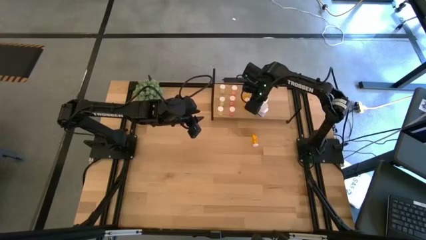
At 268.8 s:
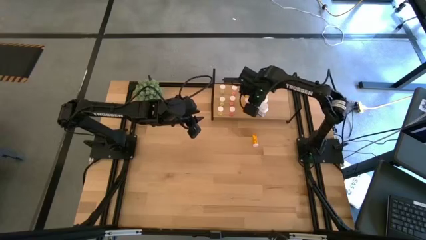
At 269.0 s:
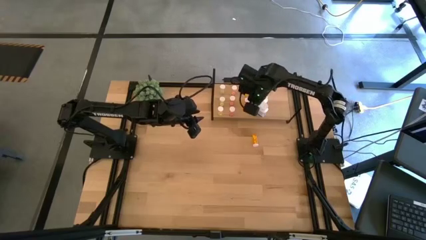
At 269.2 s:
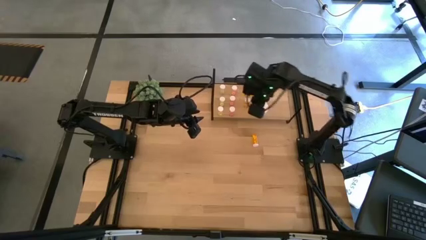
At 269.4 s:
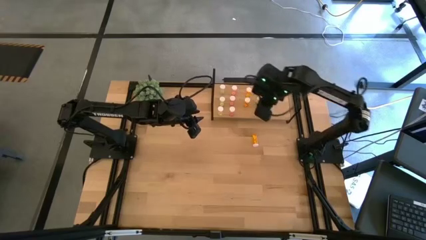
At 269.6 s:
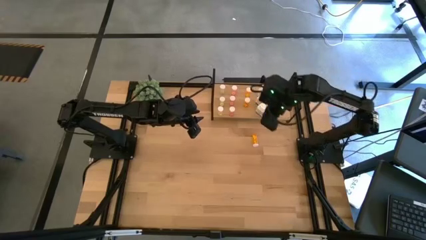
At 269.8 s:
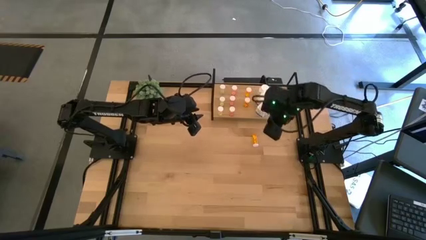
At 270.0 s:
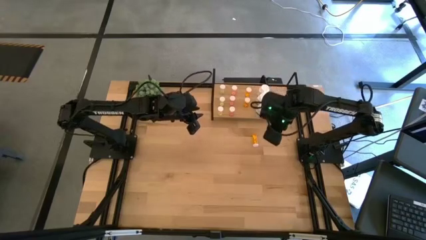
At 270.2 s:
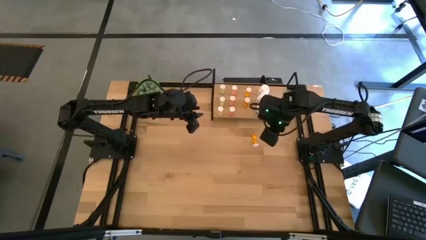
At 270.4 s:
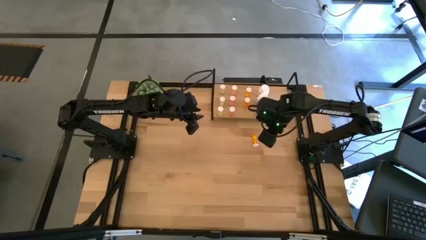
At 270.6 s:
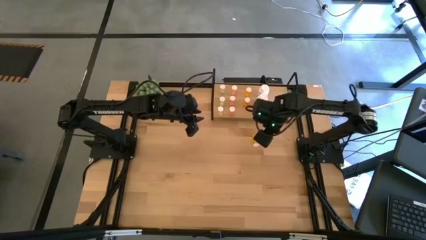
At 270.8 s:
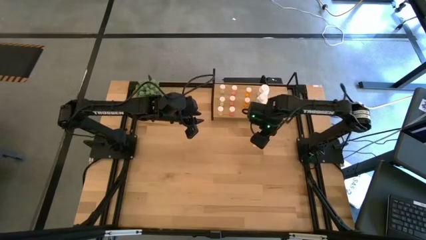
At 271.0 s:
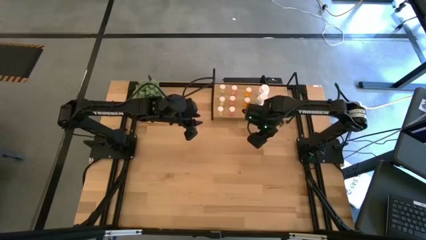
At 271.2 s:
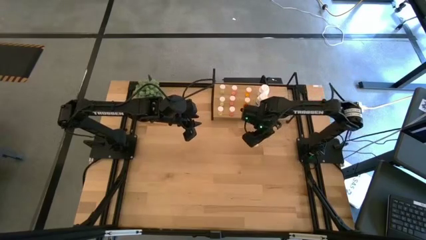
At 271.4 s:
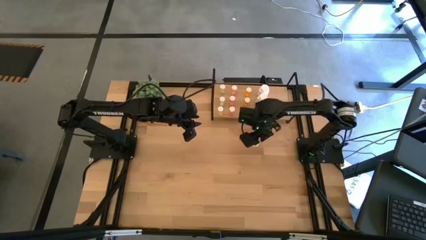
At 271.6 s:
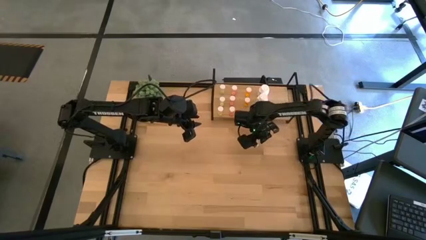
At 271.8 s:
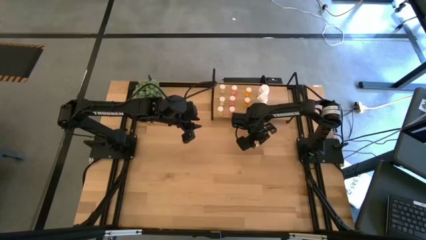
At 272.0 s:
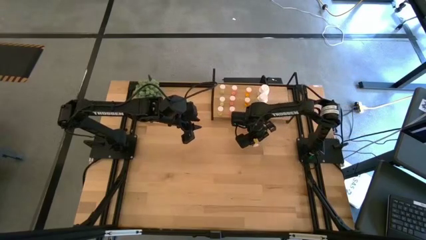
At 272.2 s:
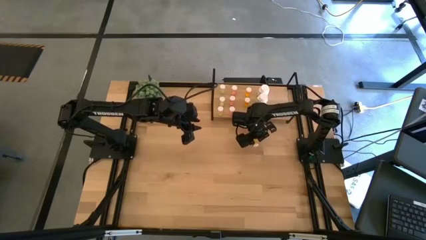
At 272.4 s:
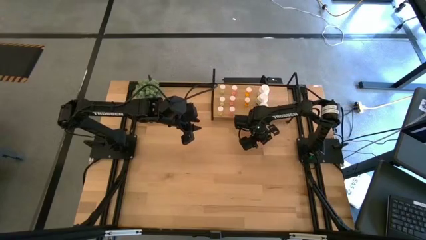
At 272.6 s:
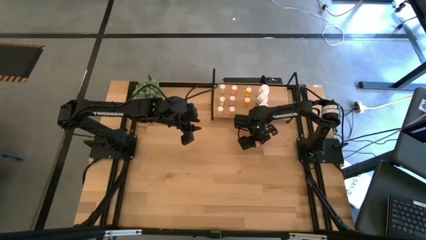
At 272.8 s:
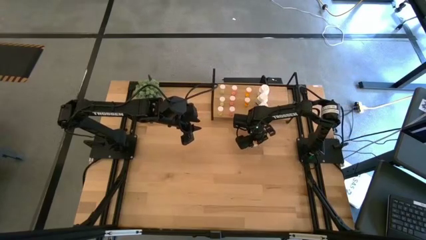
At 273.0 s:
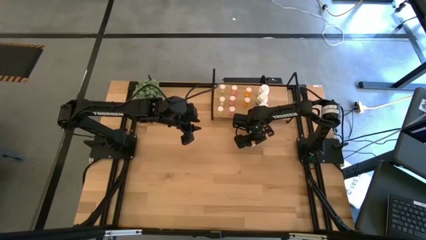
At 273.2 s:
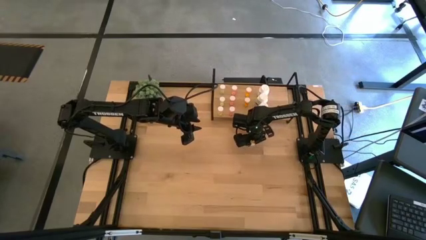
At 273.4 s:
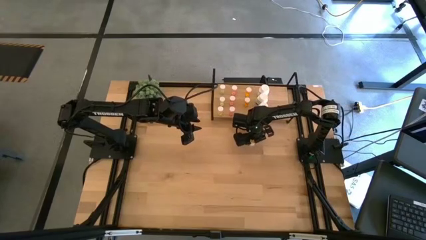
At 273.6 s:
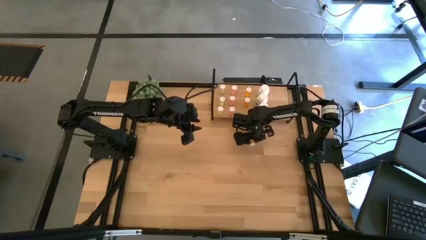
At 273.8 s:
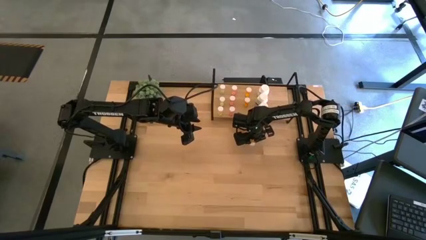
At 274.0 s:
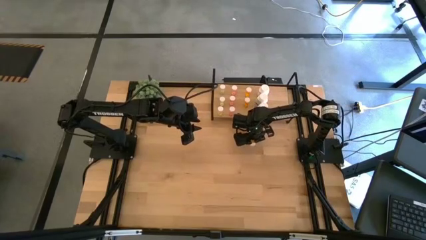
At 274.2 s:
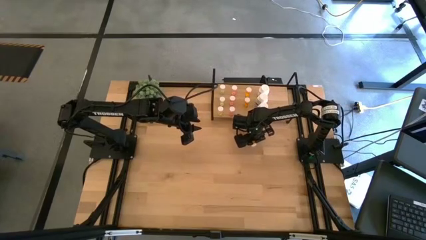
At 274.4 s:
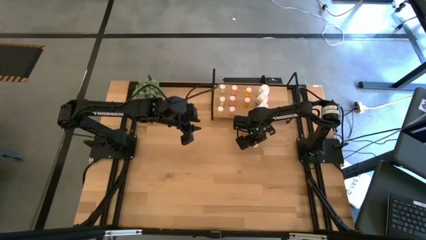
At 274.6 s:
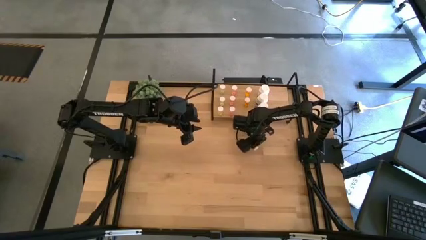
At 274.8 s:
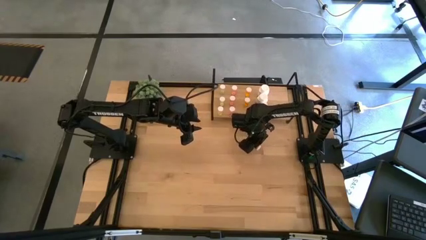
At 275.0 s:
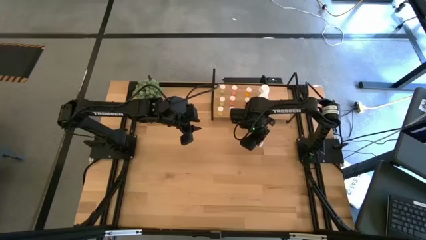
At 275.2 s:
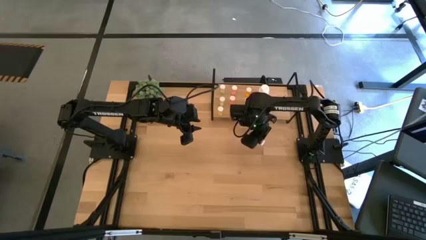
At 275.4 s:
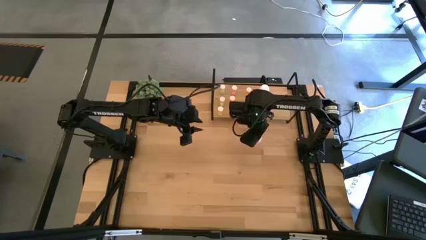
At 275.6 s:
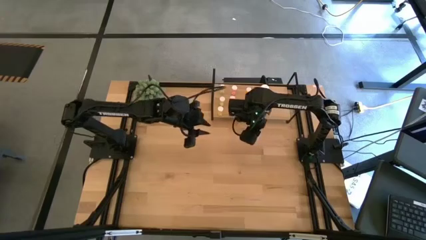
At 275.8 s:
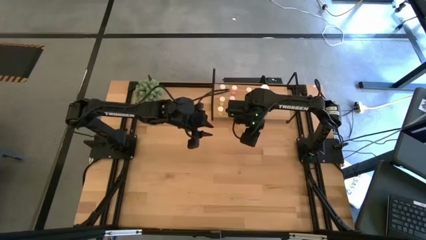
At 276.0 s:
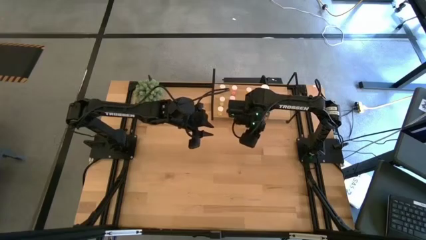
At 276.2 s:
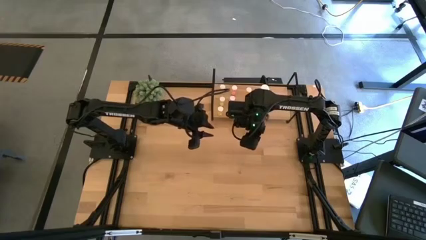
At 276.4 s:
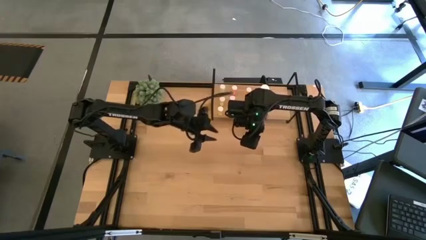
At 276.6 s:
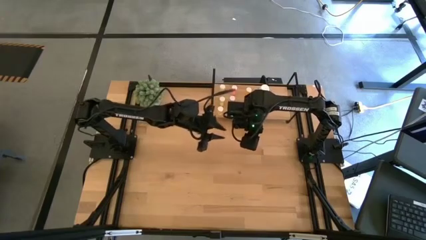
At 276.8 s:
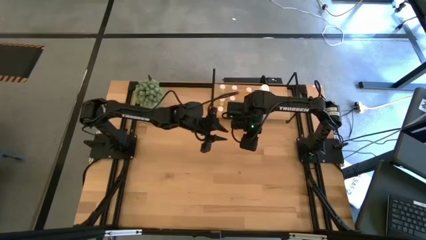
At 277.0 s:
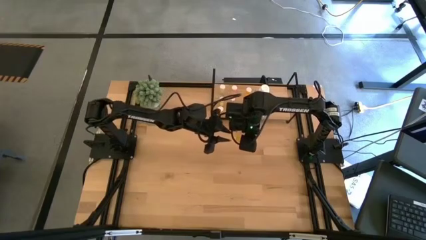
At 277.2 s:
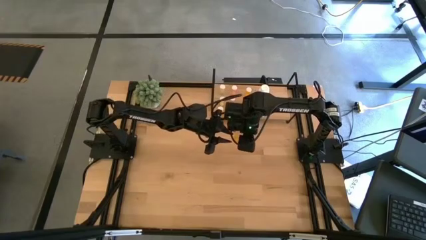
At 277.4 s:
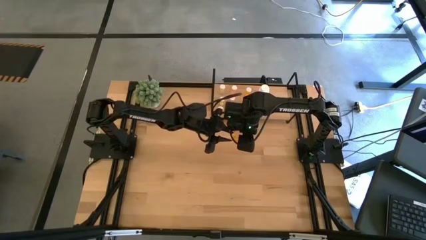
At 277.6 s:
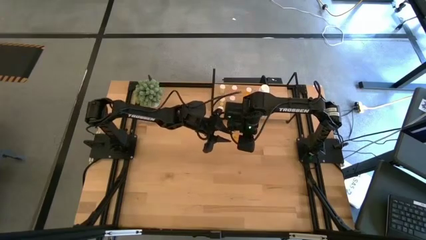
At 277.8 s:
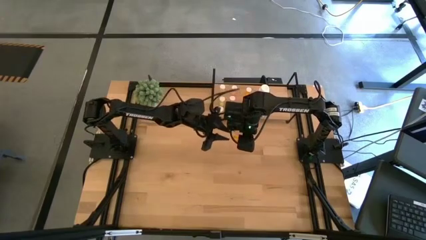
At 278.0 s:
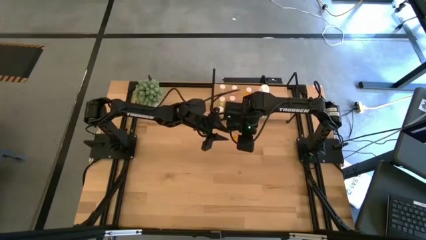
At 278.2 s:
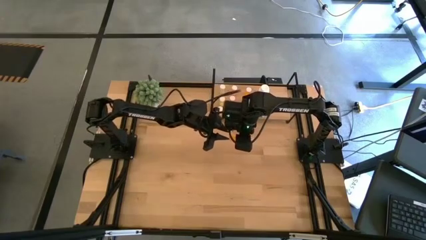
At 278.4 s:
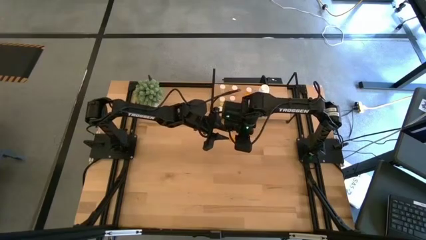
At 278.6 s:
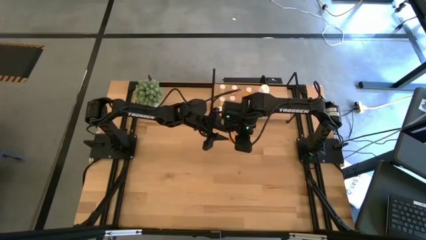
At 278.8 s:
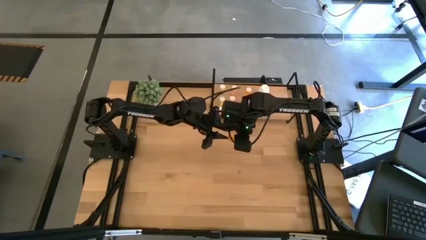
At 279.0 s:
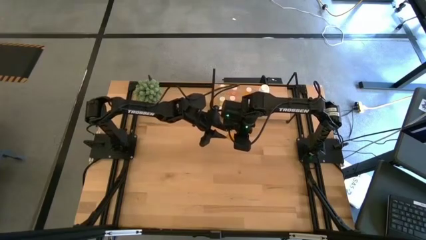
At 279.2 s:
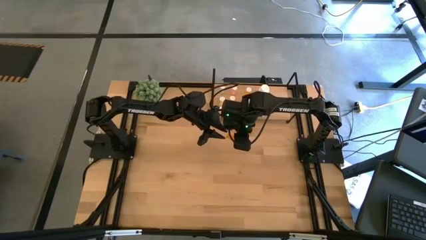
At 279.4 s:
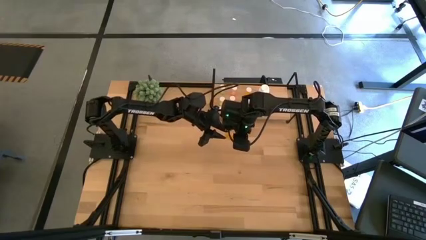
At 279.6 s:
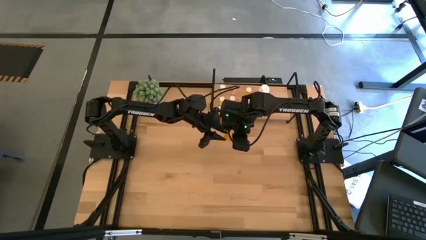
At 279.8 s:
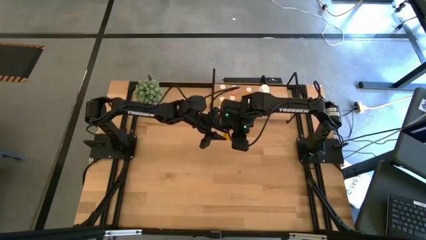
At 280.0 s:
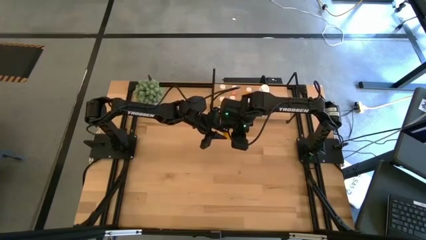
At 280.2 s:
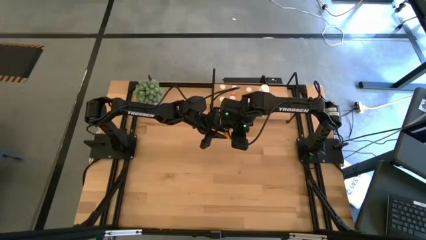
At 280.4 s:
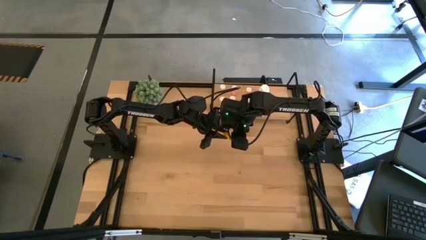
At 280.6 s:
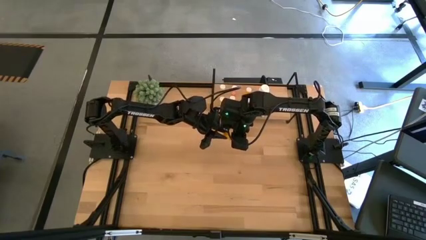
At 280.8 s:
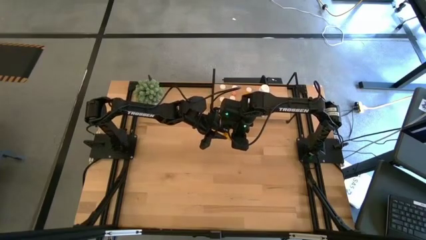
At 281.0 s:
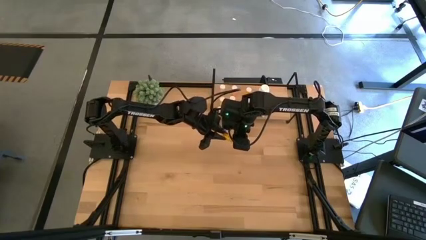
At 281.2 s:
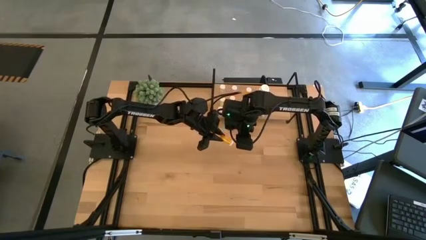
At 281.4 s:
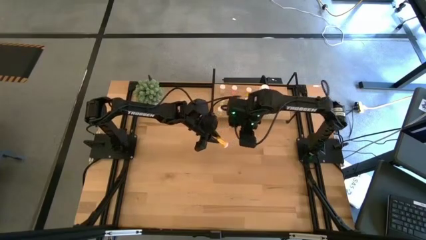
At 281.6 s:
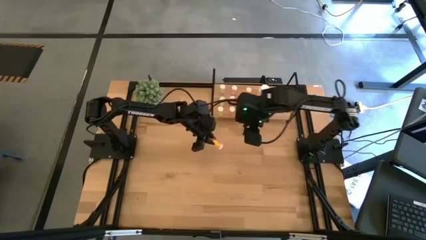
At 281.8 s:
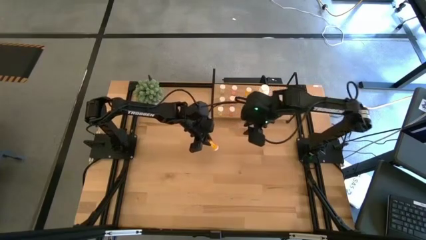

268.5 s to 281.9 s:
Task: Pick and place medicine bottles onto shelf by color
Put the orange pill bottle on the shelf aligned with the other orange pill bottles

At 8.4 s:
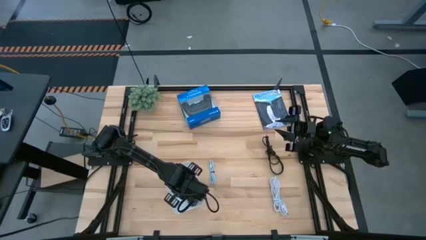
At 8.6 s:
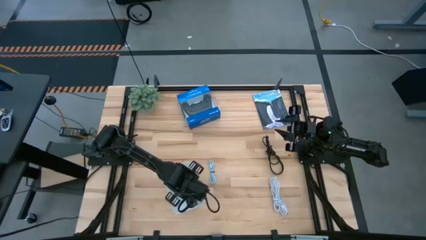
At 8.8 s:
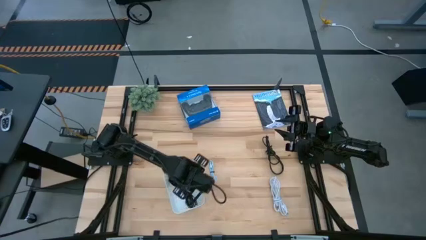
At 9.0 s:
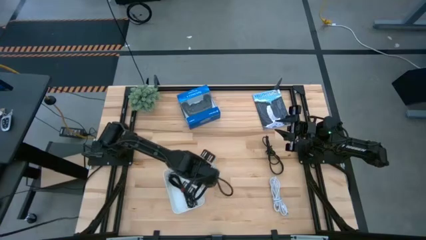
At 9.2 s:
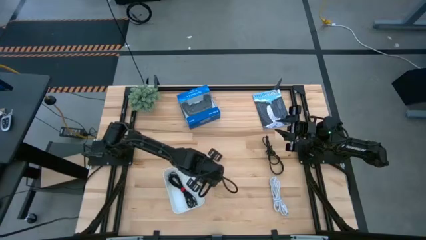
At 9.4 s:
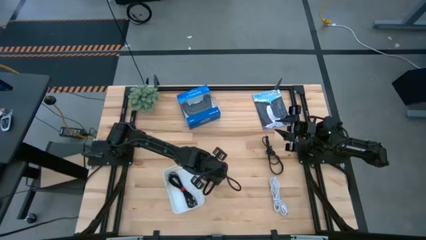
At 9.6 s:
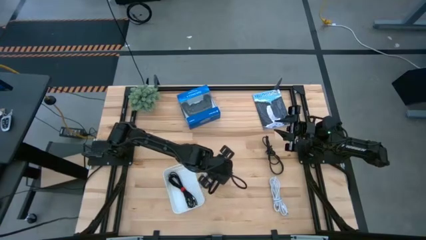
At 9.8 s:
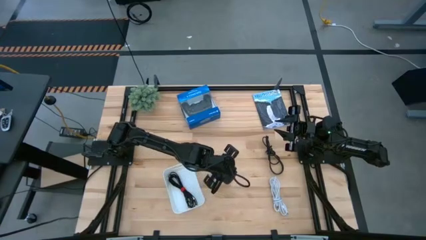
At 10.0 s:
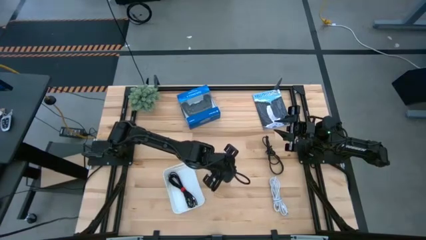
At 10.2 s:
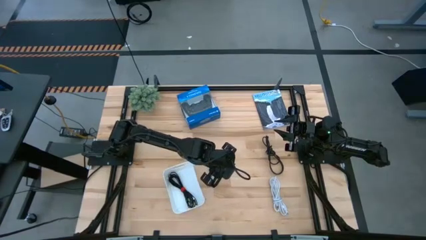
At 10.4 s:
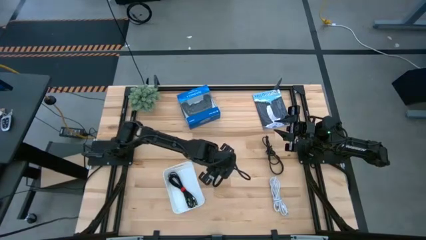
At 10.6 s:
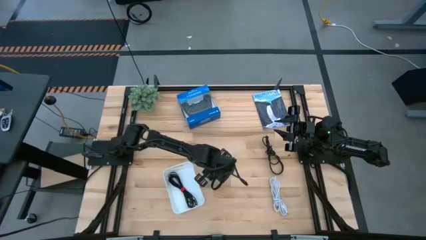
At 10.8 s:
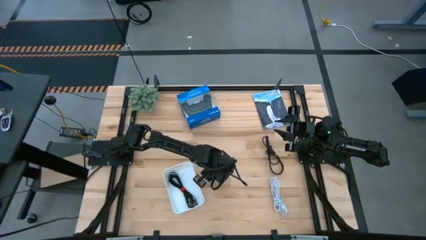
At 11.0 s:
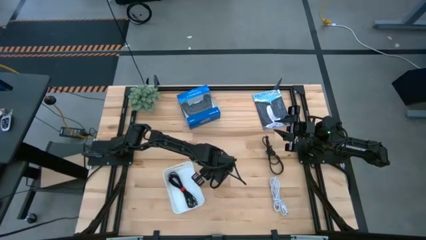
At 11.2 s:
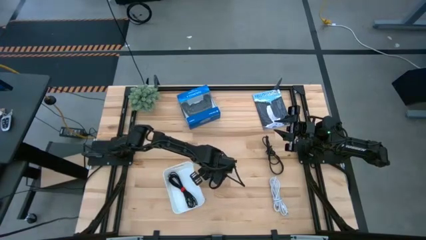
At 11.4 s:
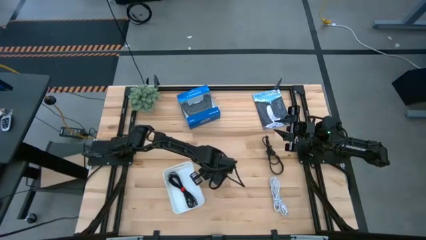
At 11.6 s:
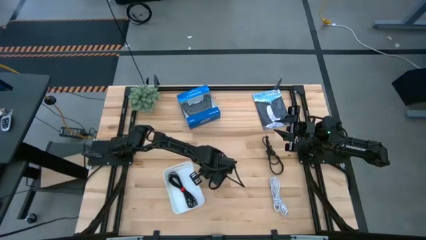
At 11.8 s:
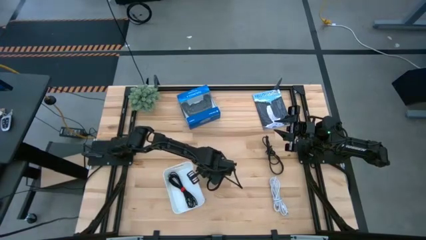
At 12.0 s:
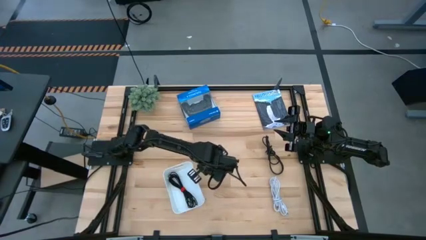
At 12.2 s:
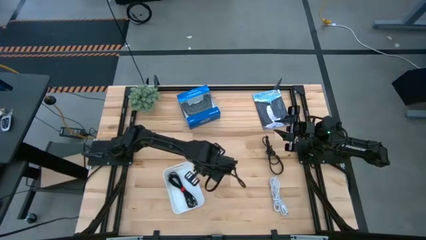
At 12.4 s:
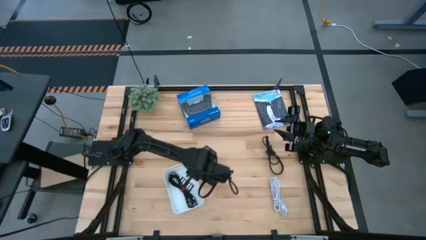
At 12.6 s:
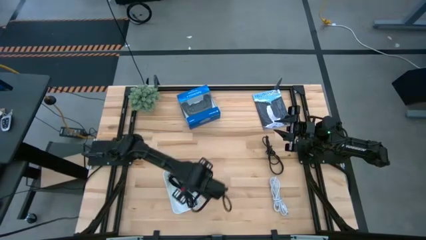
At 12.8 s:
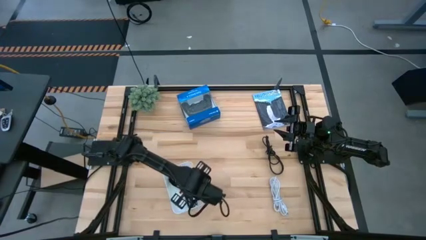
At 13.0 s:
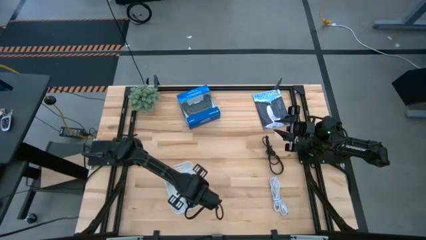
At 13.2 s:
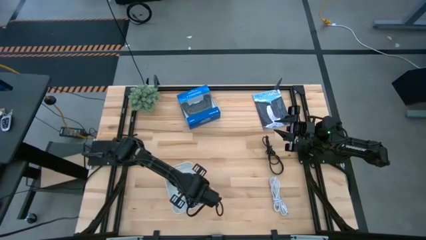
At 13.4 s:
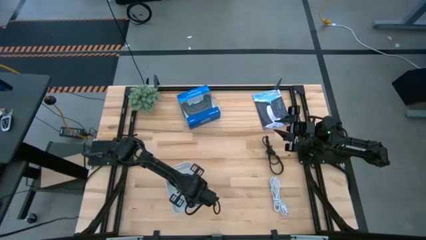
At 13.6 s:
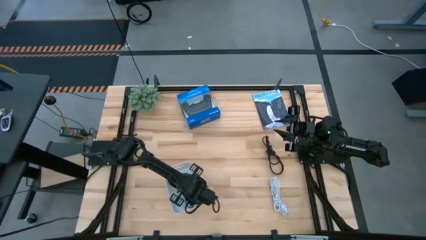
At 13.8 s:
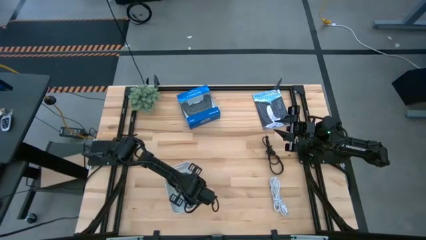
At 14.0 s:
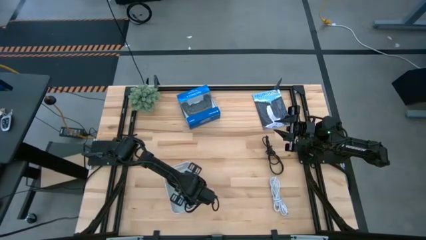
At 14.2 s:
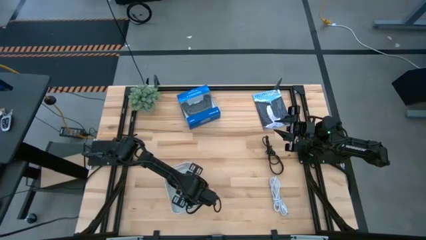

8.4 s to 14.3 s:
Task: Pick and place USB-C Cables
Put the blue charger cable into the bin
